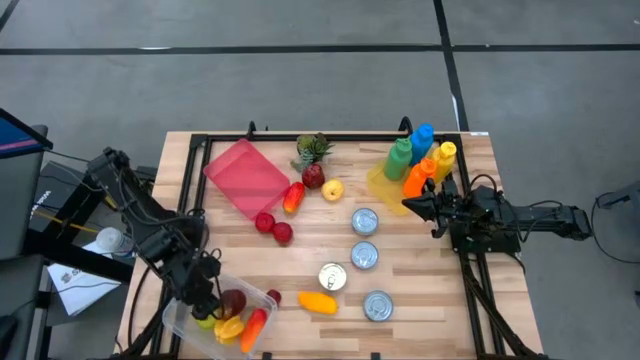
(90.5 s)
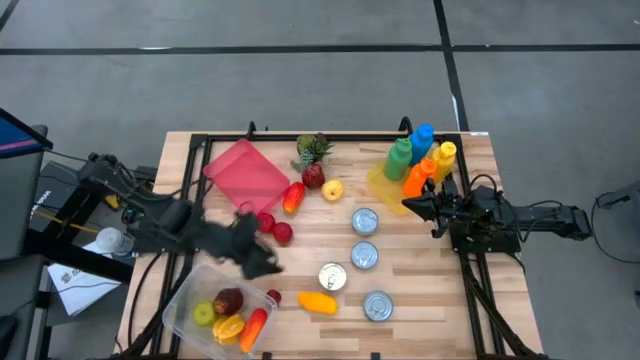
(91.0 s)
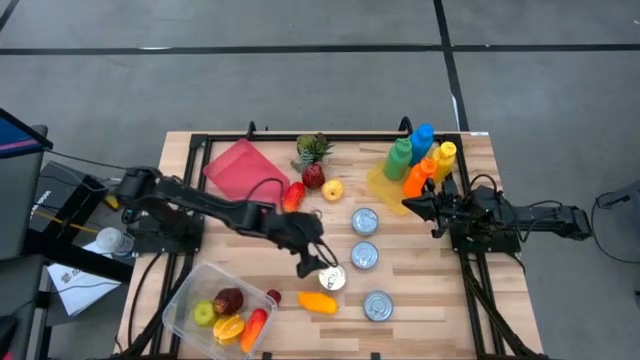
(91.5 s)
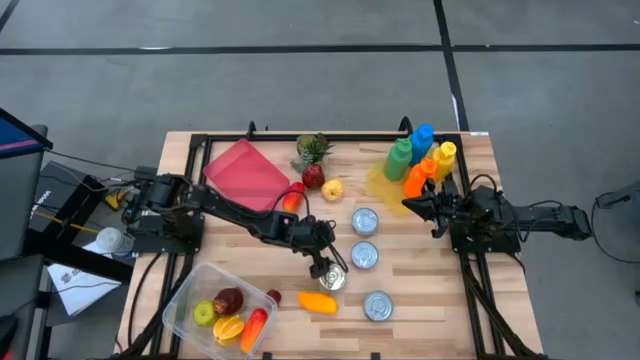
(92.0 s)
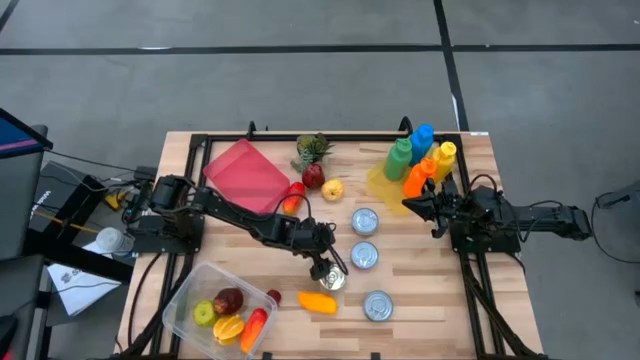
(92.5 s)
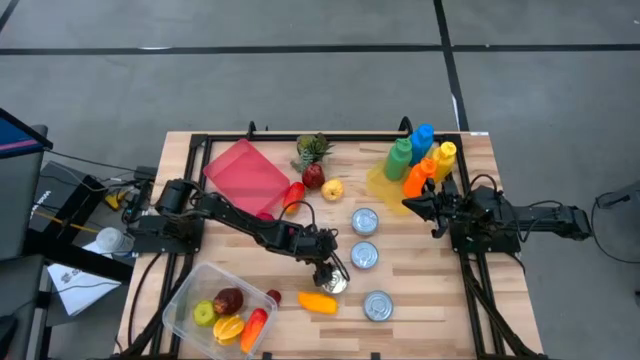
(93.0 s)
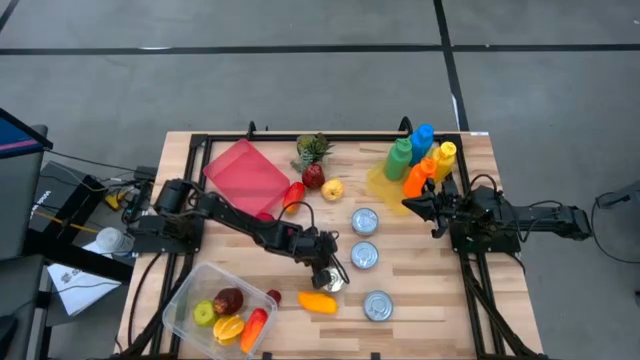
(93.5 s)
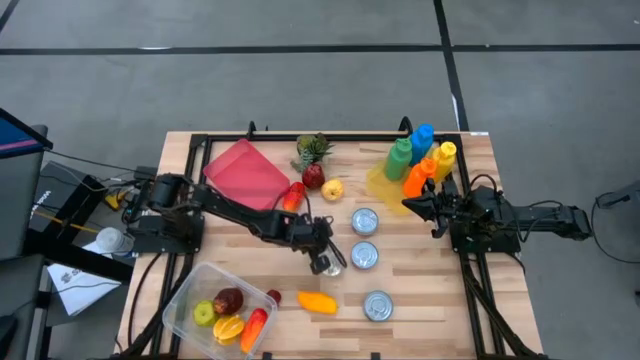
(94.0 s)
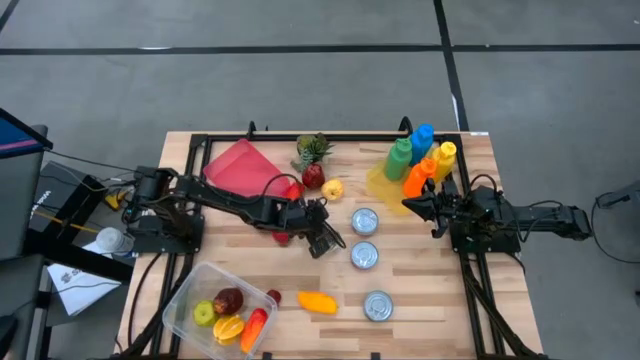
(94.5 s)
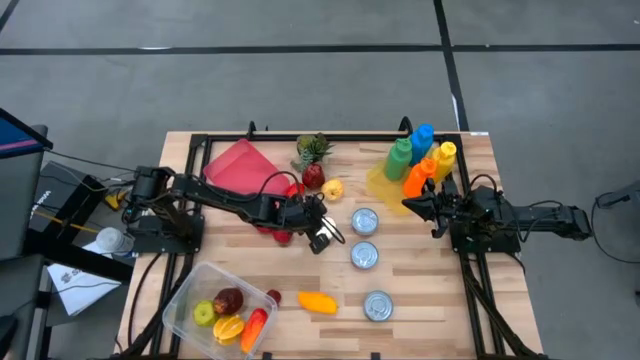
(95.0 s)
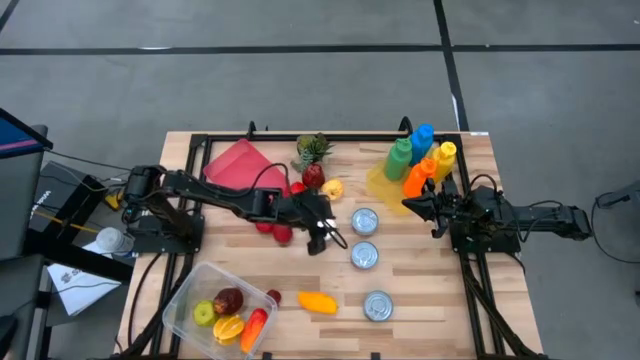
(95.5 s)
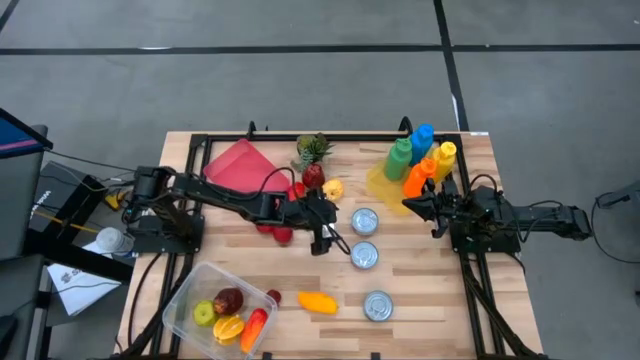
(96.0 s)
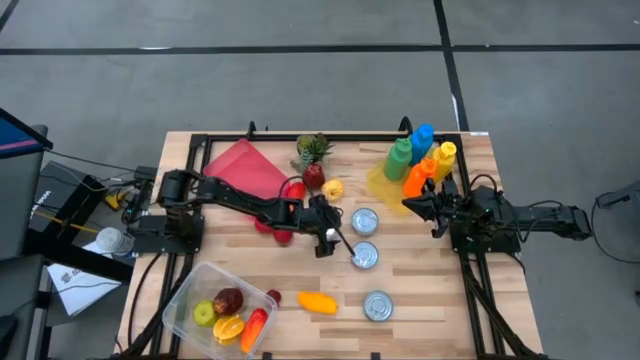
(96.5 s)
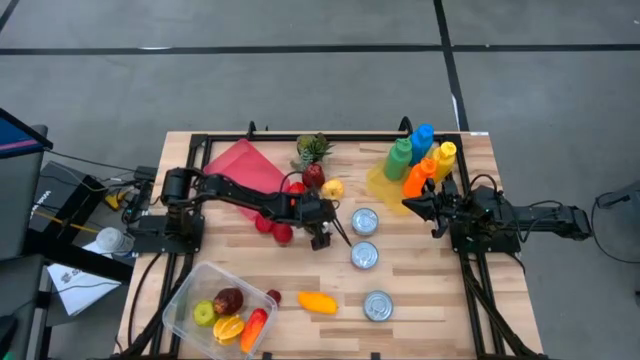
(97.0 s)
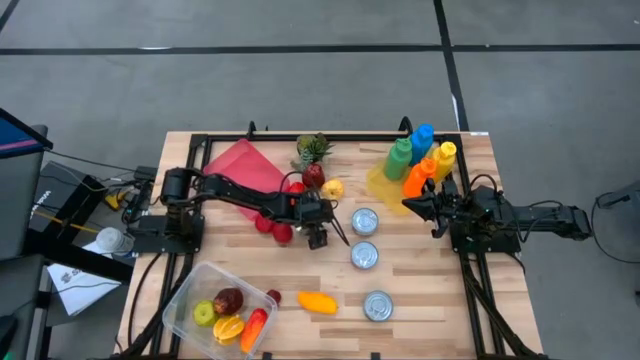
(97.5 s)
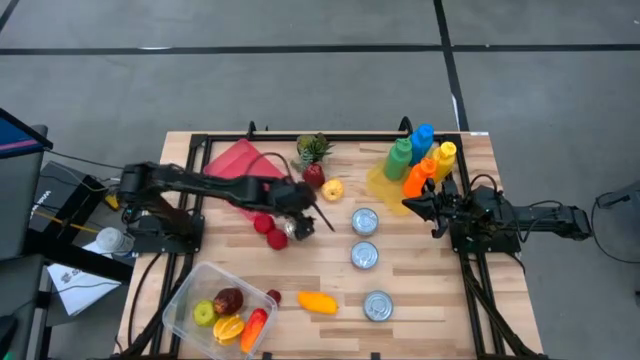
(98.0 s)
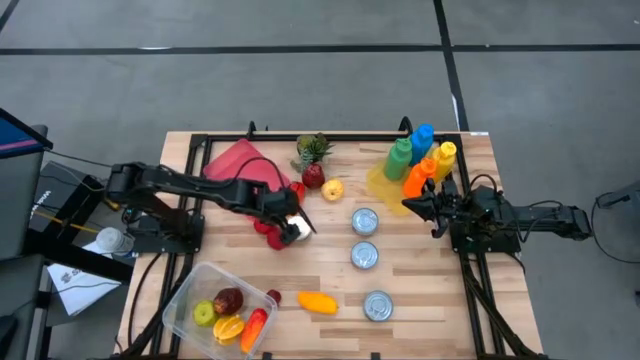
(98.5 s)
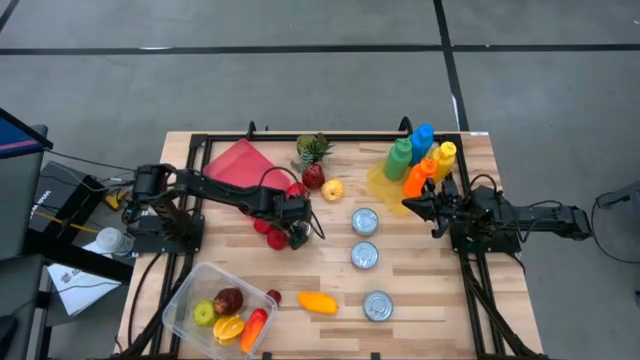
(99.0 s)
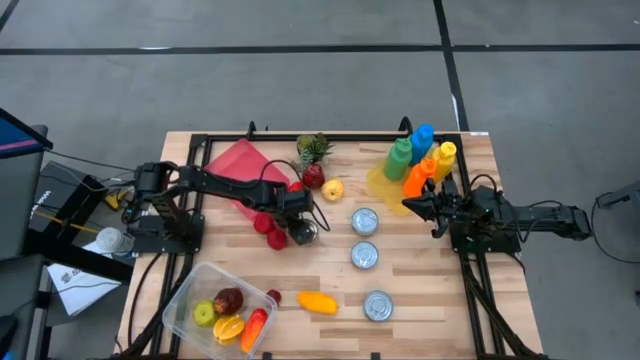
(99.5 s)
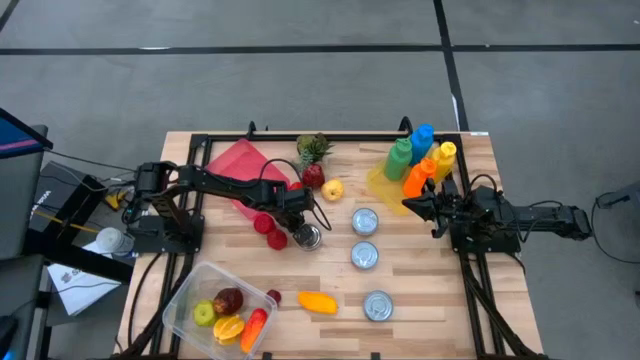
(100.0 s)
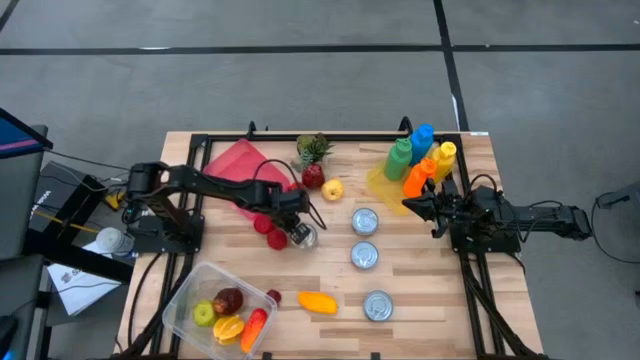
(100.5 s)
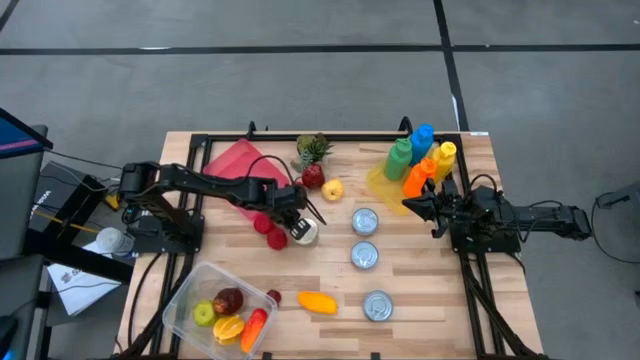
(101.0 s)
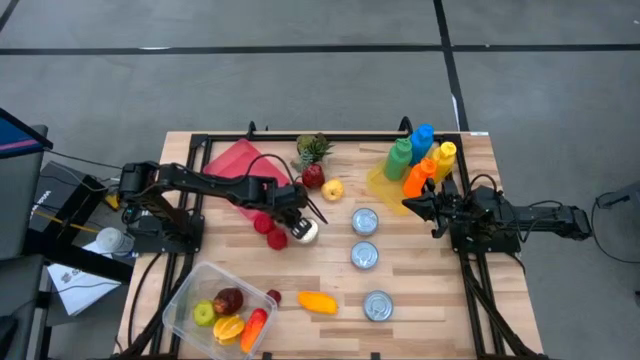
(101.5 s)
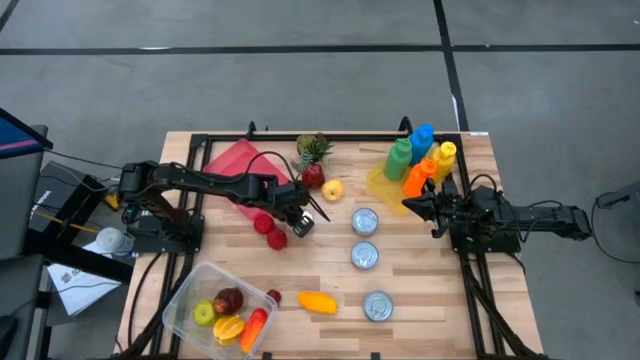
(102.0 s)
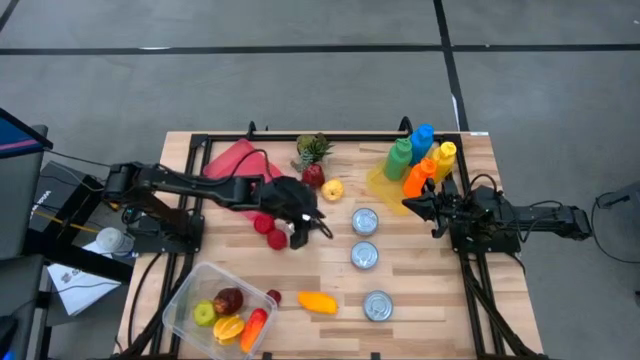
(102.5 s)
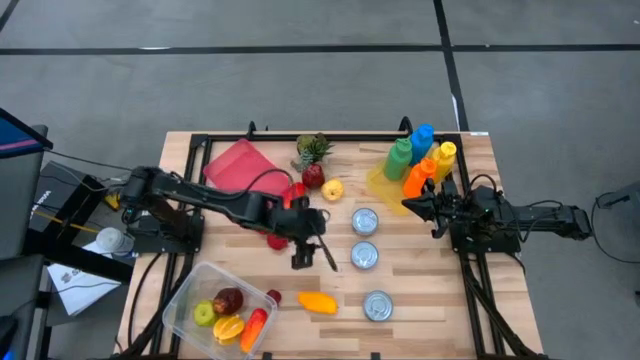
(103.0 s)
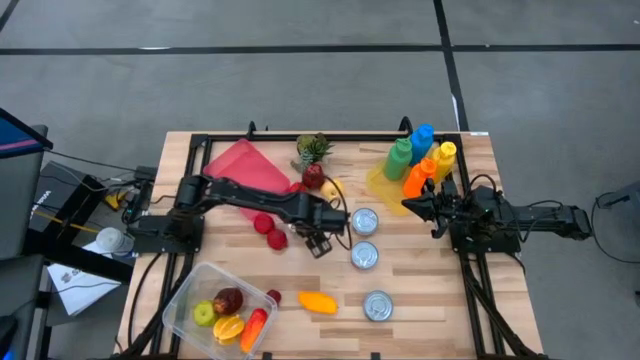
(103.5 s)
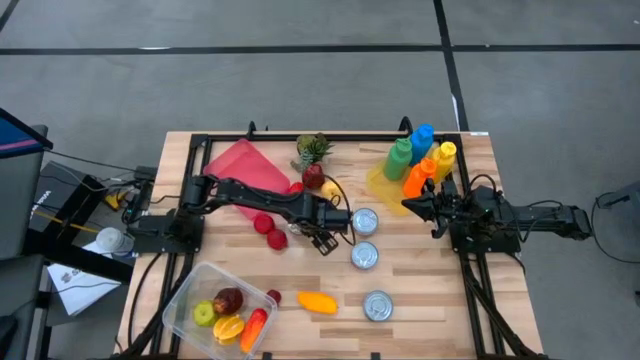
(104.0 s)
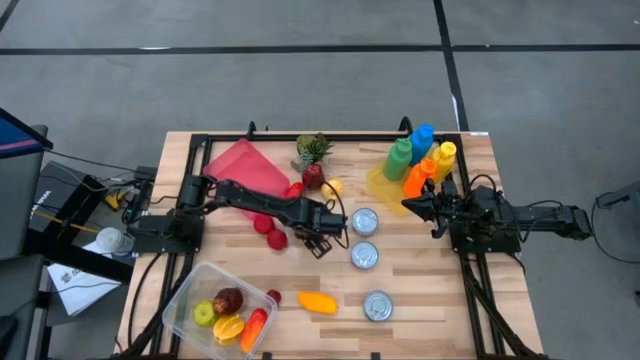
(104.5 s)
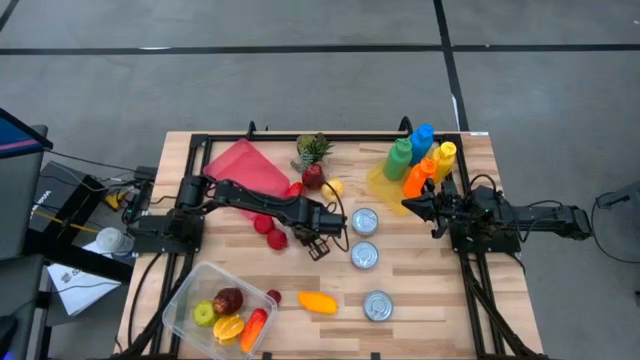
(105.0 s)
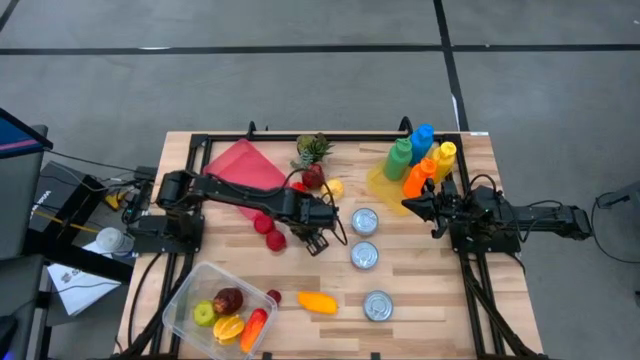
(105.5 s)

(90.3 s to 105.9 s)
Task: Pick & Place Food Item
Put the blue pink tuna can into the pink bin

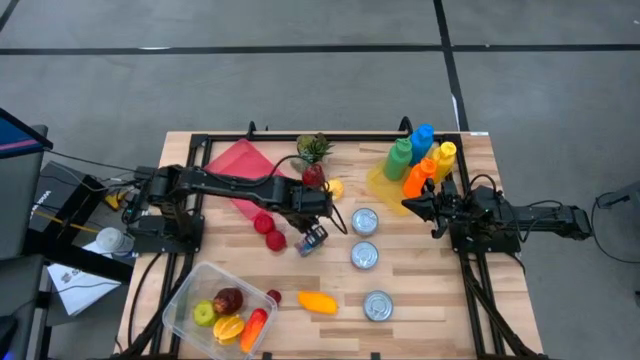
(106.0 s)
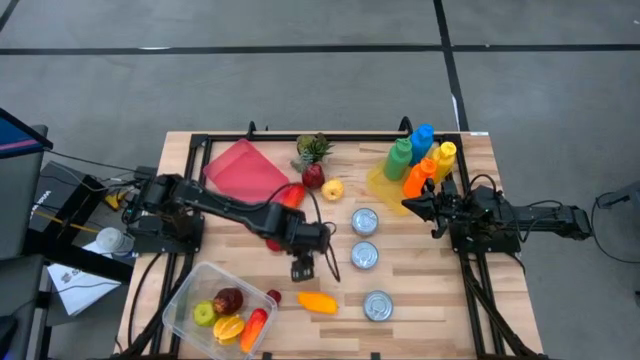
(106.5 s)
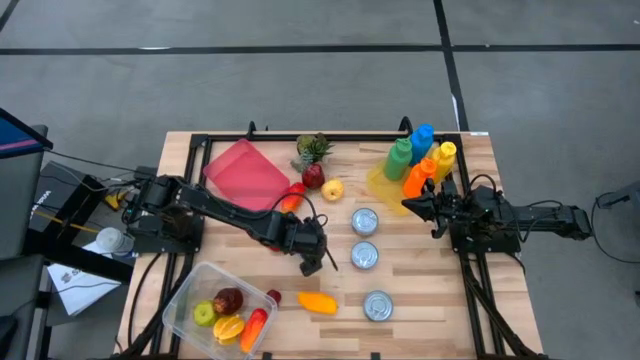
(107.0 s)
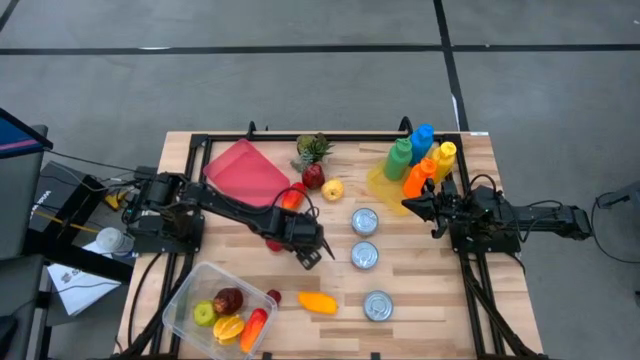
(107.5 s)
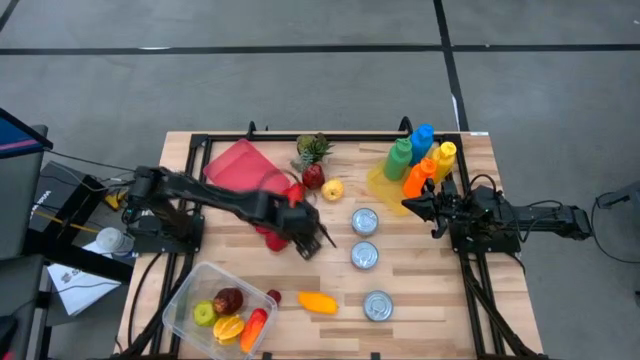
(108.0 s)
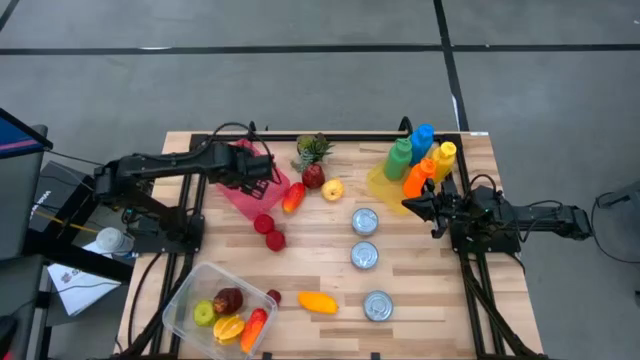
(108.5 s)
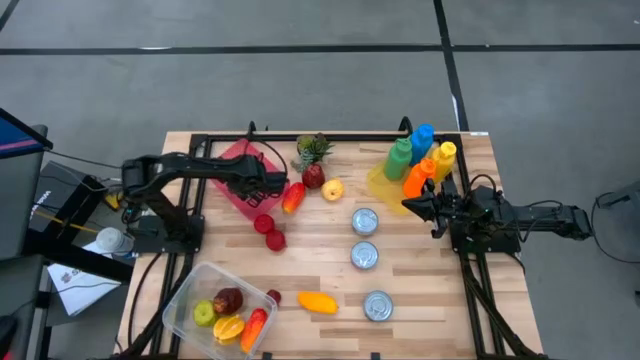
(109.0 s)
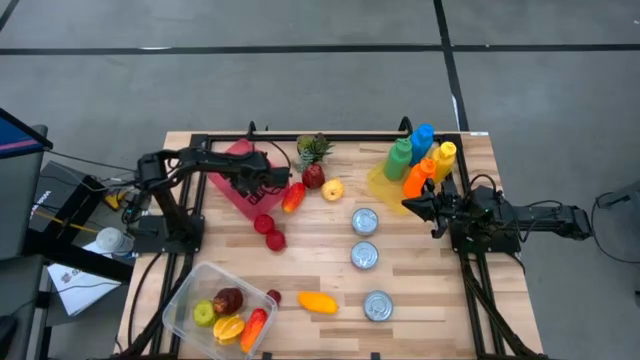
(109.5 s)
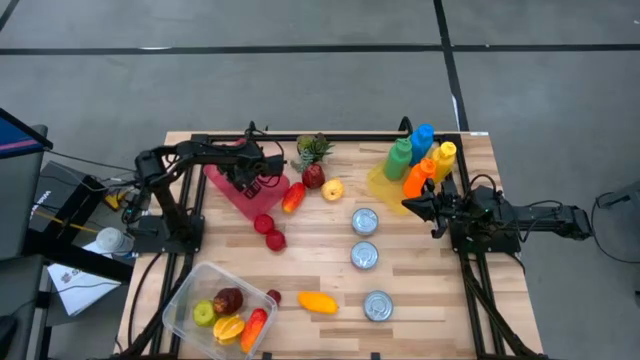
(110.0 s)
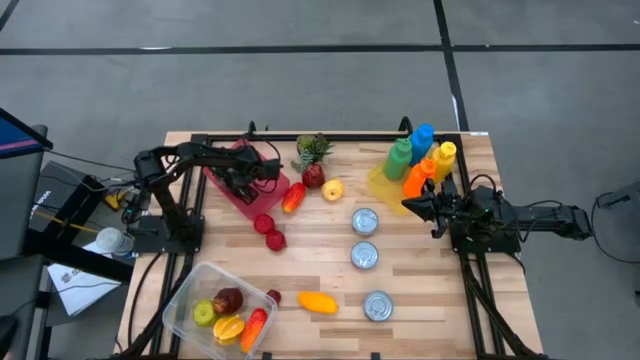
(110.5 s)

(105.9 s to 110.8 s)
Put the blue pink tuna can into the pink bin

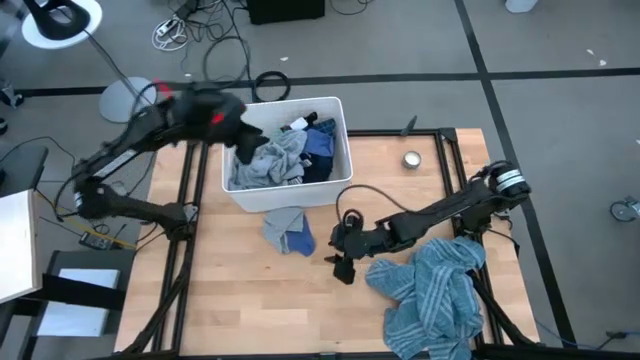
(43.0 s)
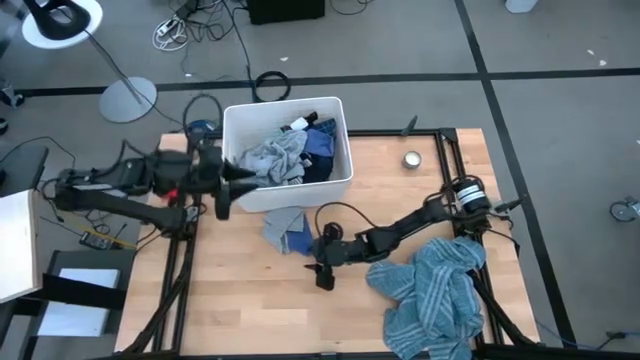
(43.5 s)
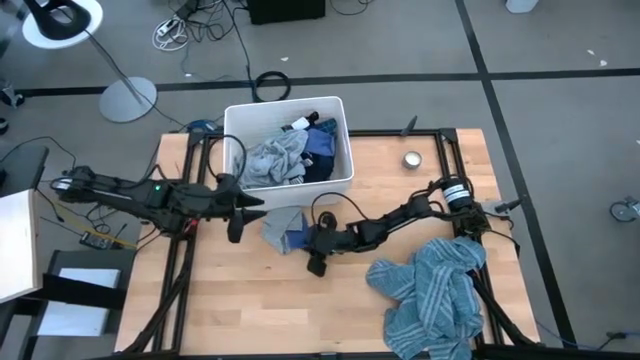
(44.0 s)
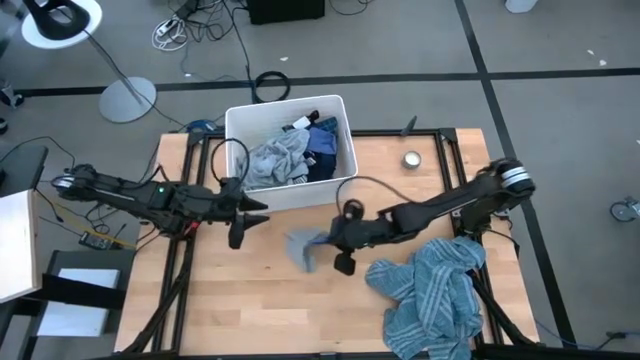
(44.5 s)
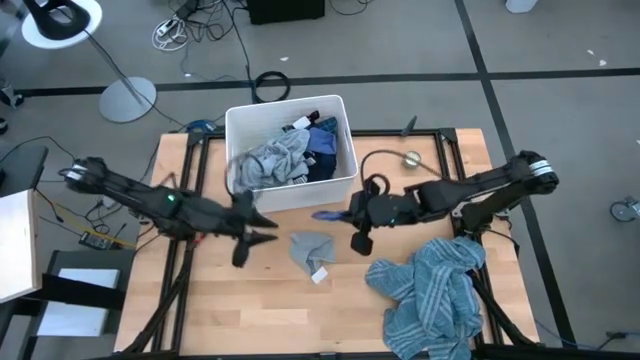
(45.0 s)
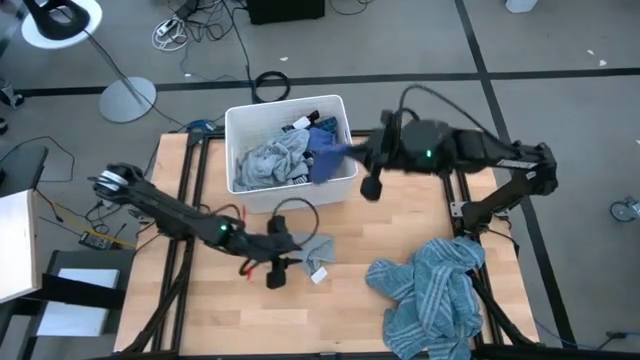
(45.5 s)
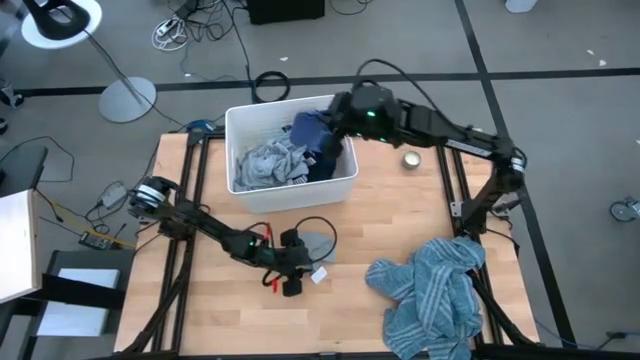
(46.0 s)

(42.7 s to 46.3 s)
Task: Sort clothes
Put the blue sock into the white laundry bin
